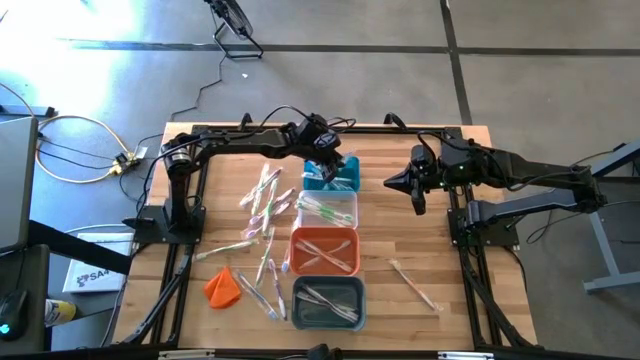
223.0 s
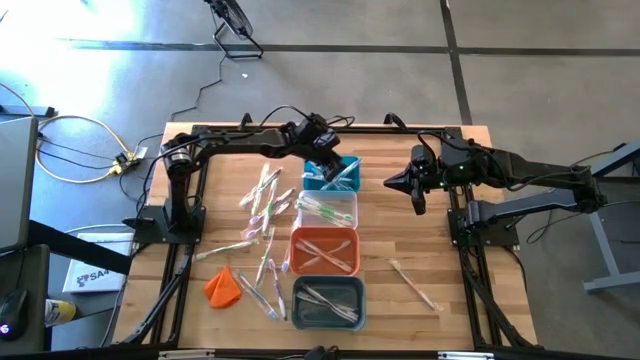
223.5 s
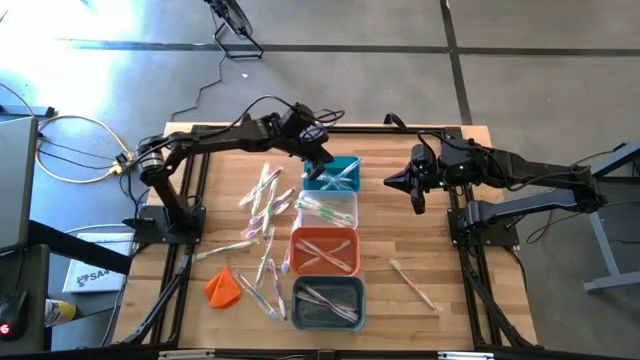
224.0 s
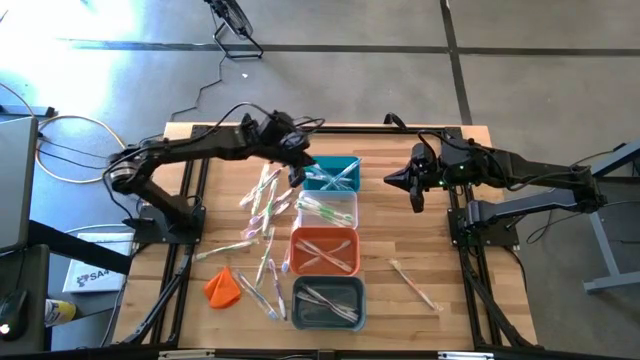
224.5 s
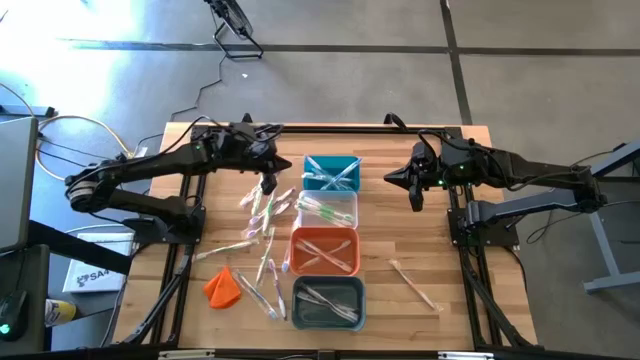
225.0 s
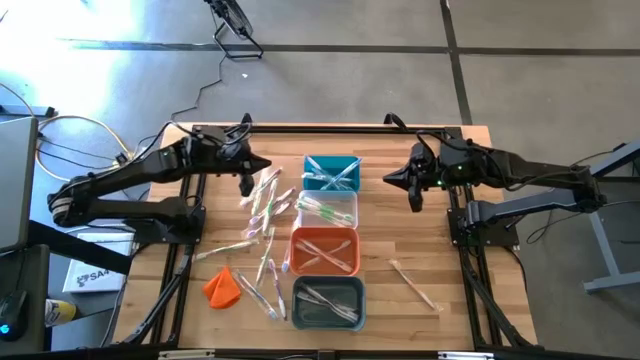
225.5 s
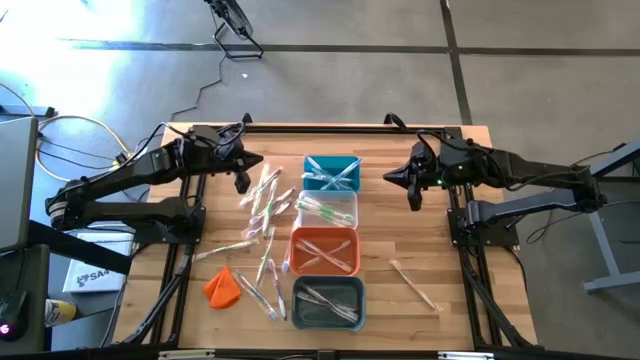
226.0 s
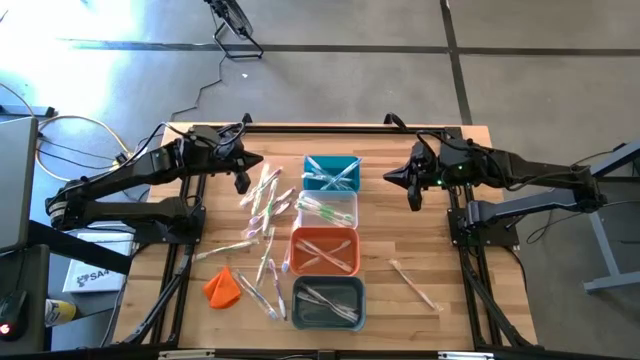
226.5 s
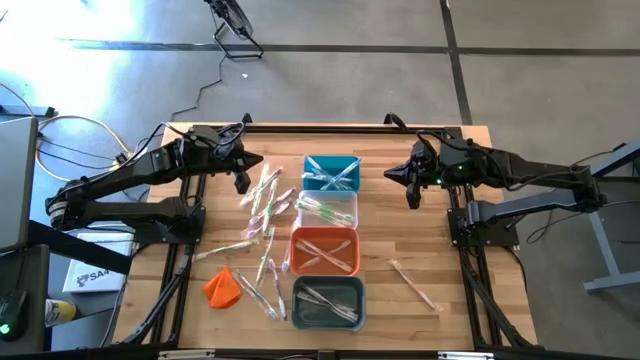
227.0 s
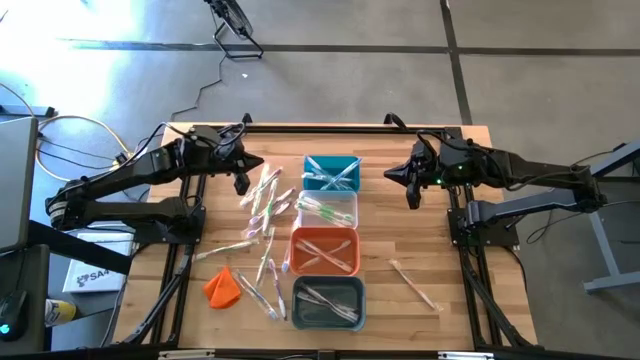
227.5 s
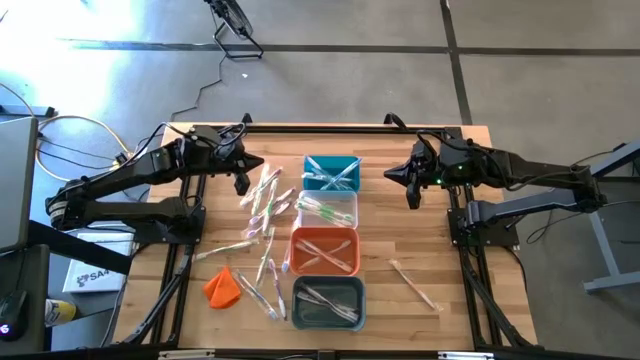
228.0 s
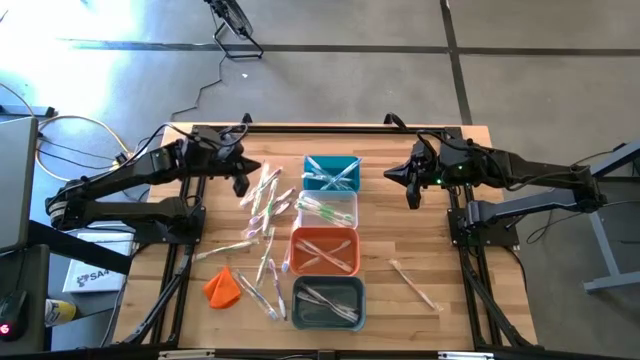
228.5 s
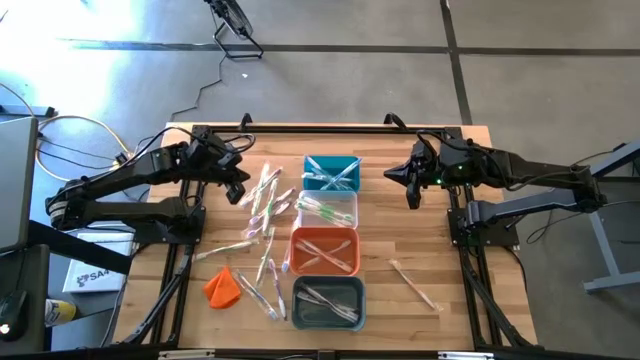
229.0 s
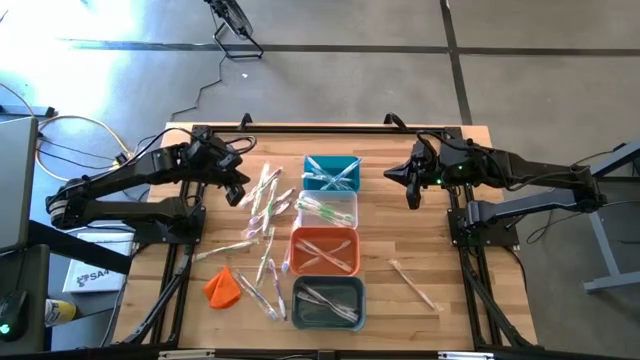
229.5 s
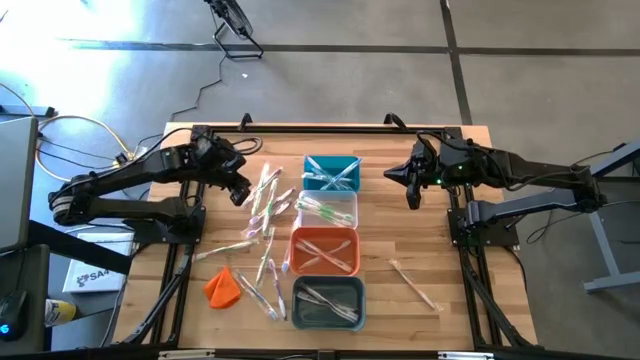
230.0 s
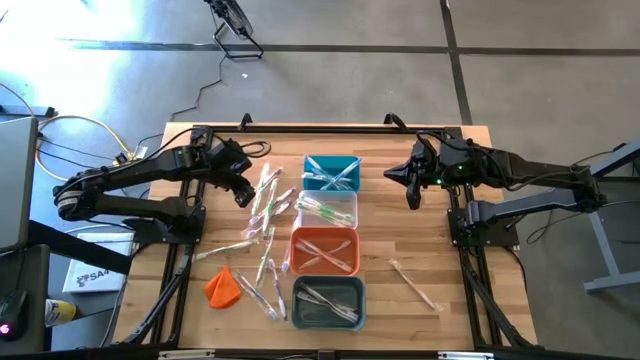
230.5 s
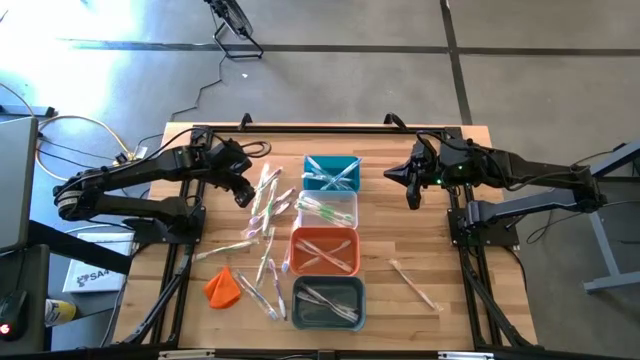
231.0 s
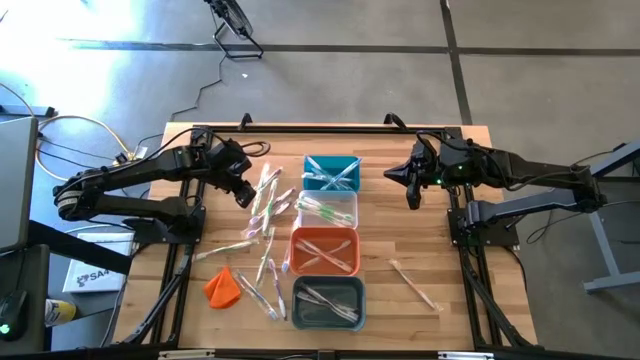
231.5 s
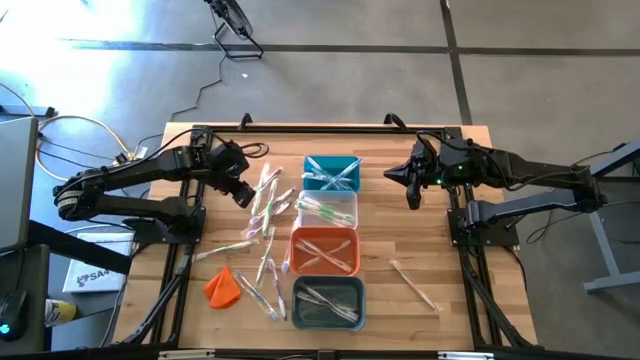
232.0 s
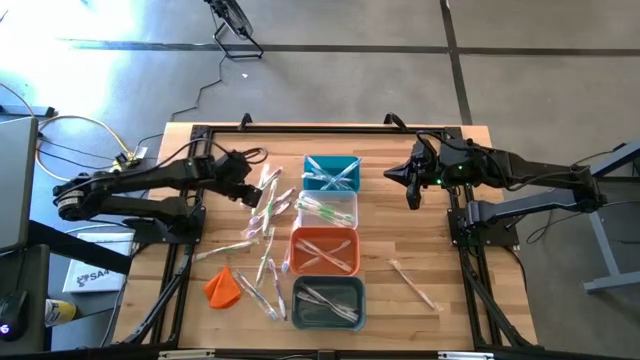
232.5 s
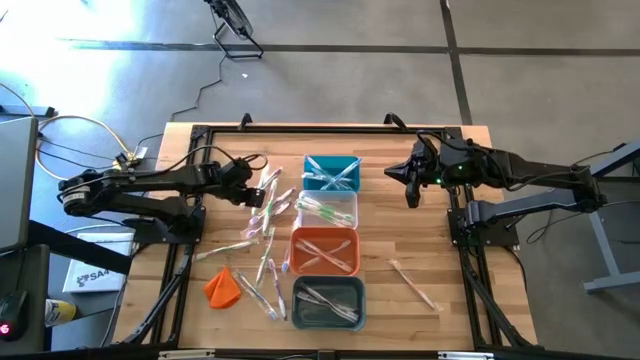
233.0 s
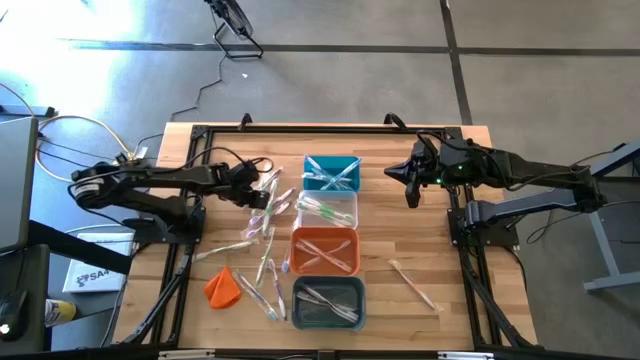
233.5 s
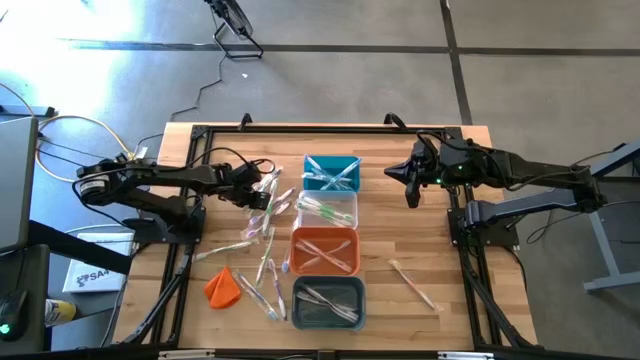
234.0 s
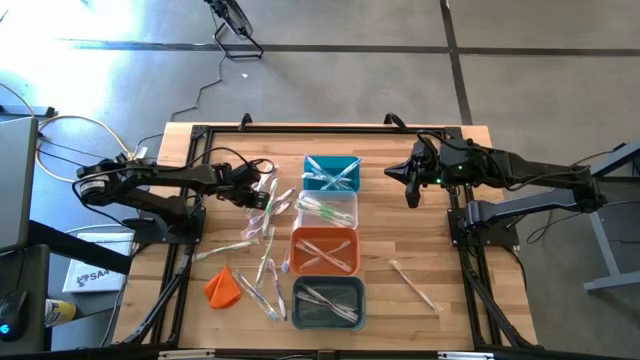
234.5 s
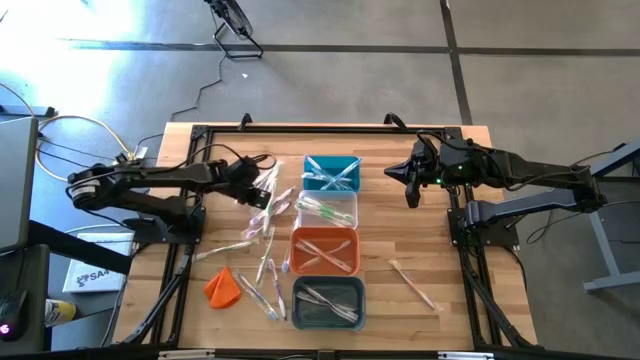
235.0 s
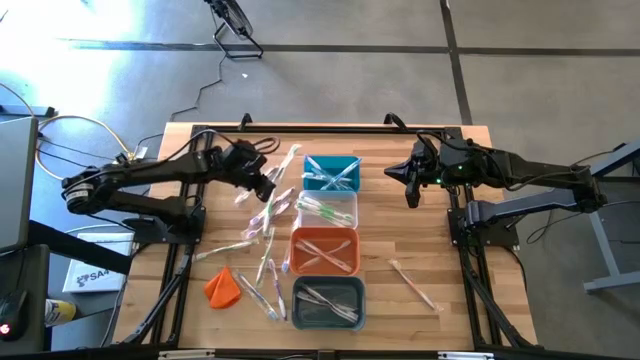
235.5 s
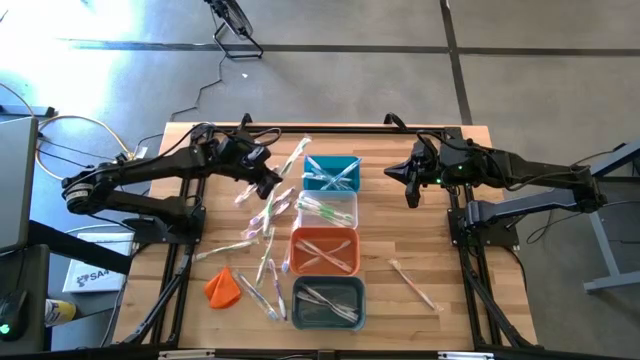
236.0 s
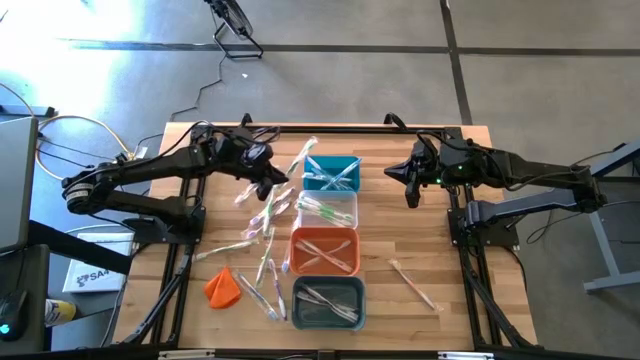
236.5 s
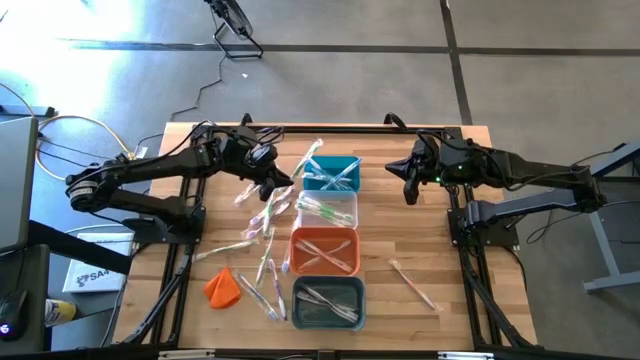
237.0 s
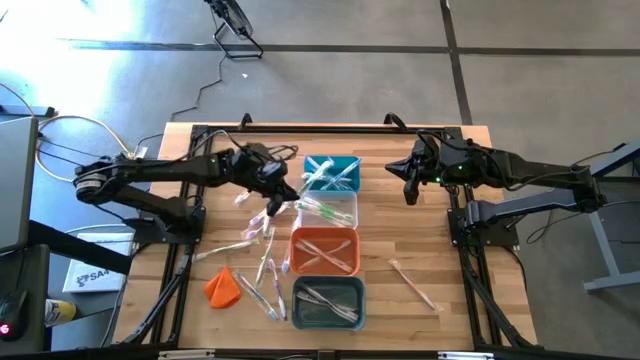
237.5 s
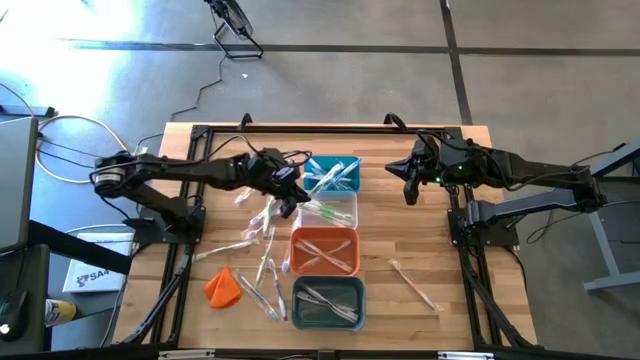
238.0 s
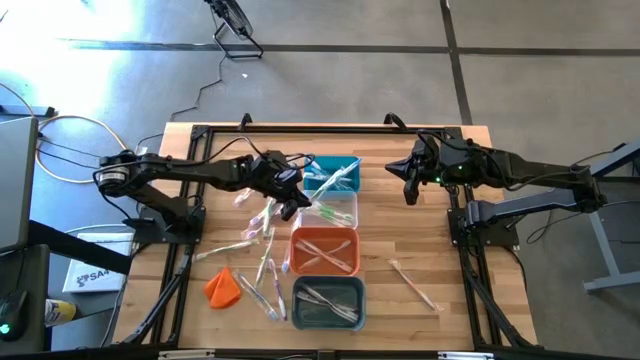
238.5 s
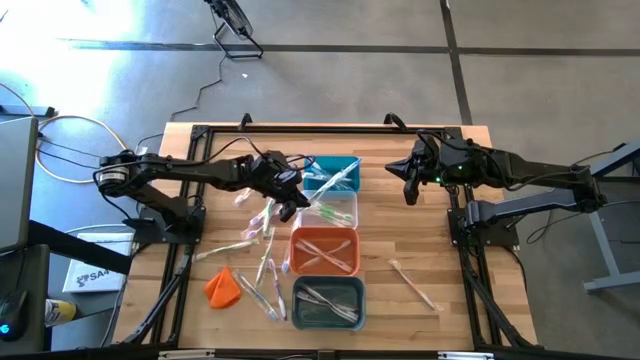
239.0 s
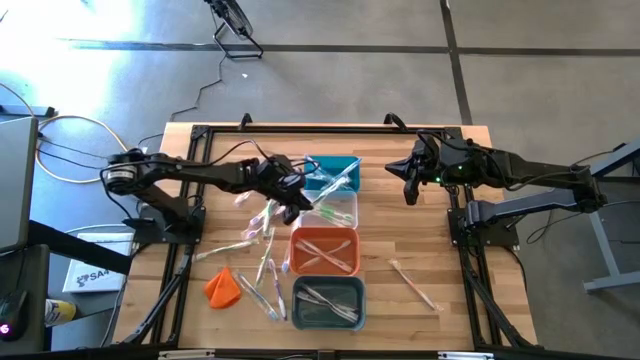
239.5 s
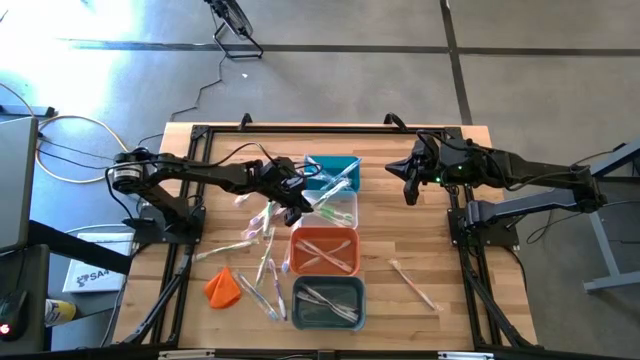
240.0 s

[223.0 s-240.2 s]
Task: Pick & Place Toothbrushes
Put the green toothbrush into the transparent bin

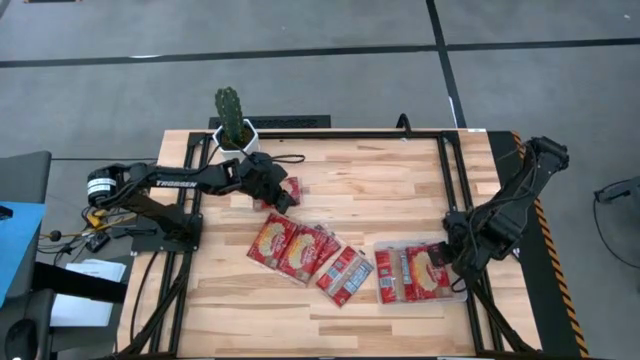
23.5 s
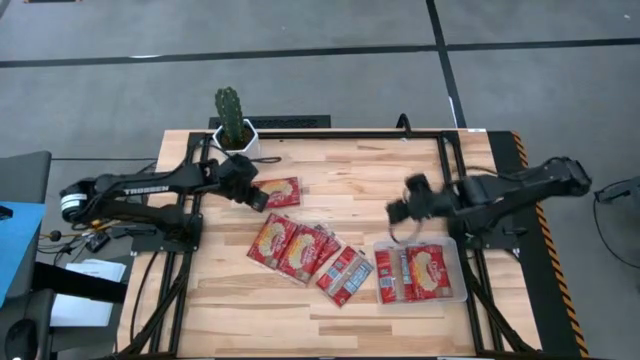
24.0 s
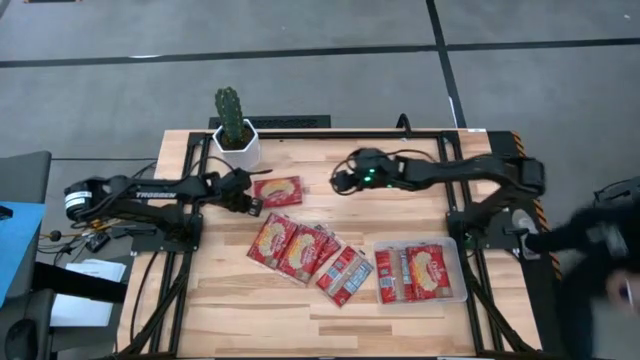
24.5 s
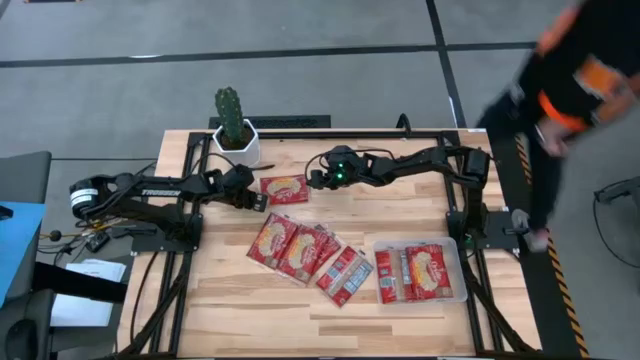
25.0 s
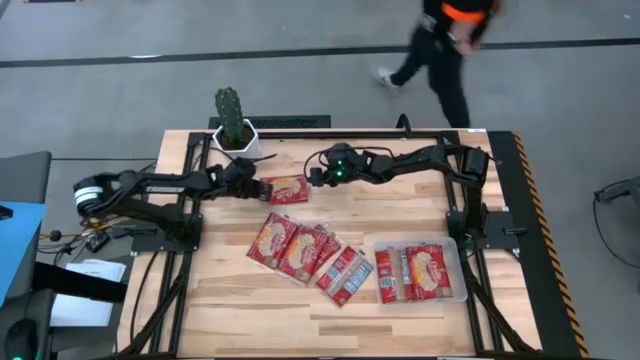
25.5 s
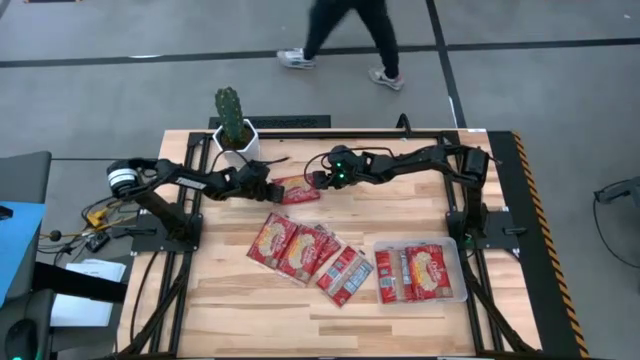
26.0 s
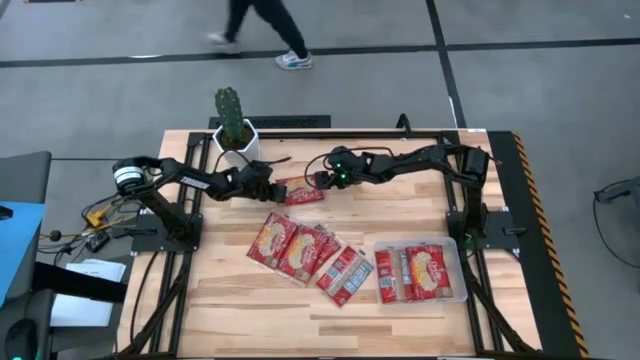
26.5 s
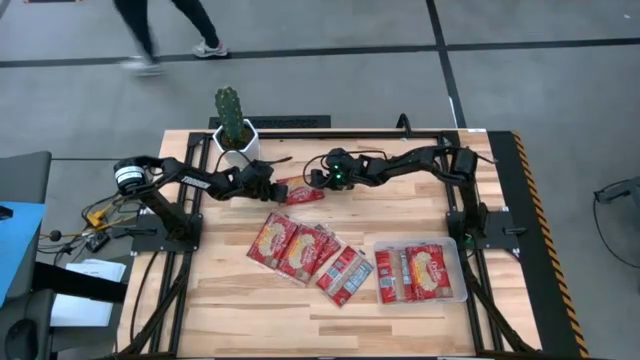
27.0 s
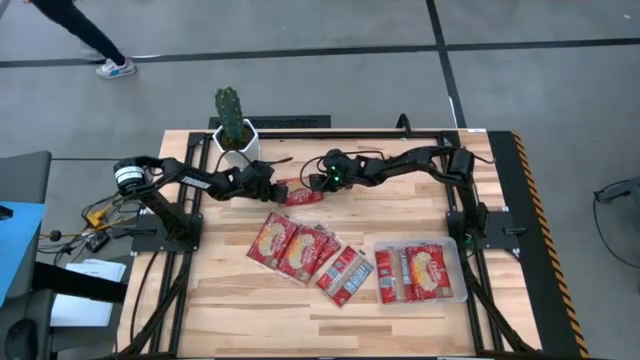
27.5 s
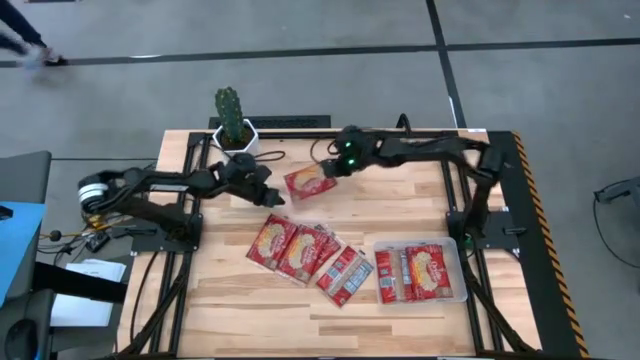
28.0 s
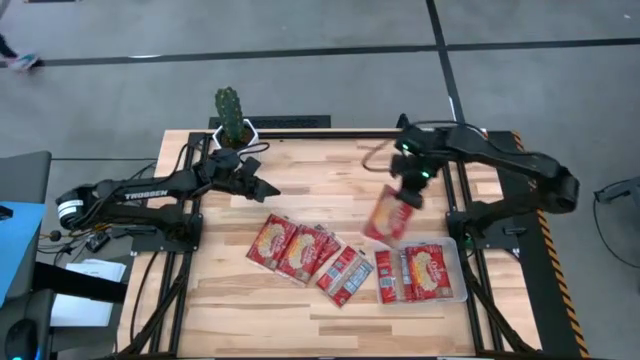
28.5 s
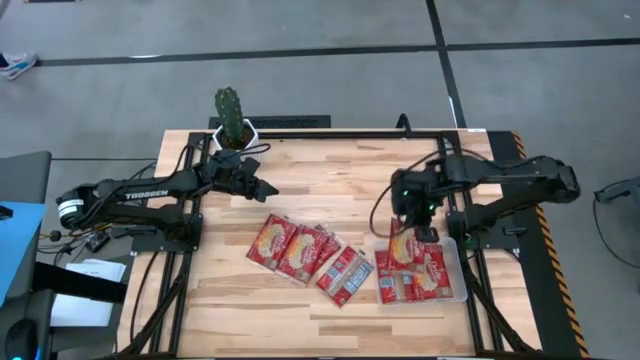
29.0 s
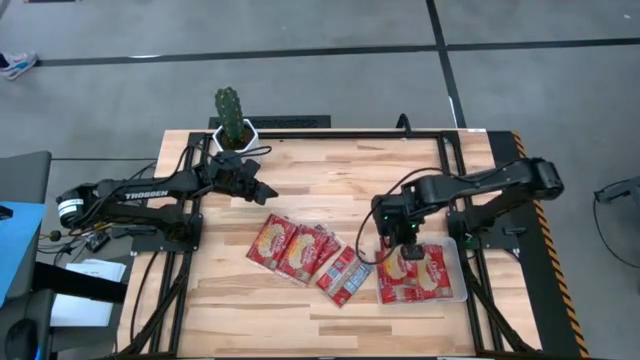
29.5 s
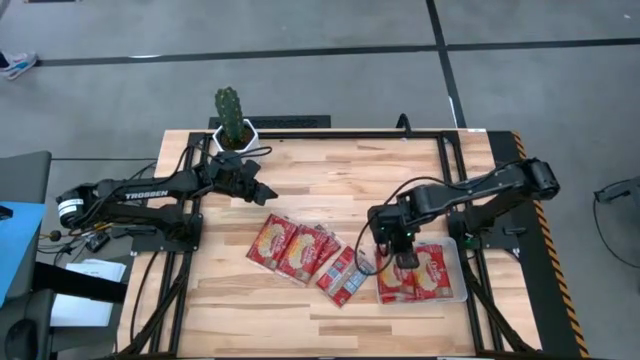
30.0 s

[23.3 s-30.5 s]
Task: Sort popcorn bags into baskets
Put the popcorn bag into the transparent bin
